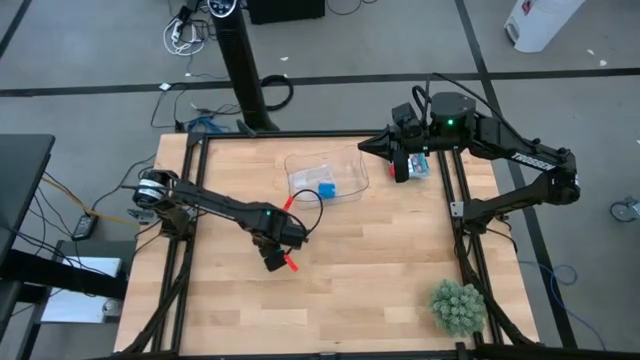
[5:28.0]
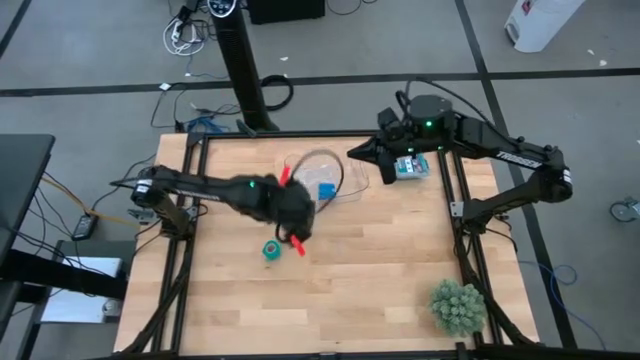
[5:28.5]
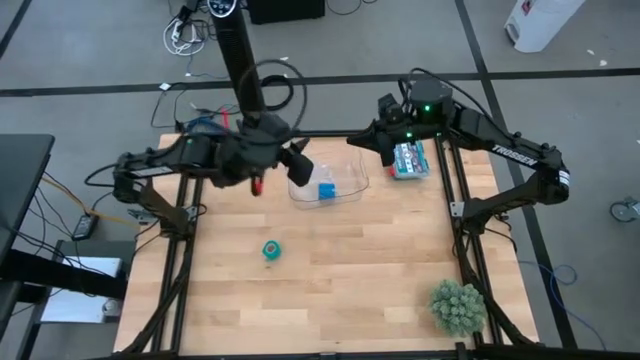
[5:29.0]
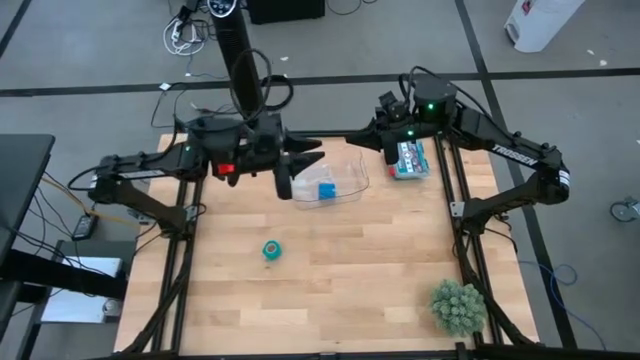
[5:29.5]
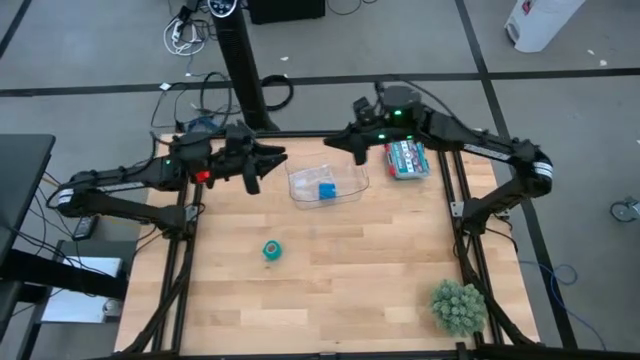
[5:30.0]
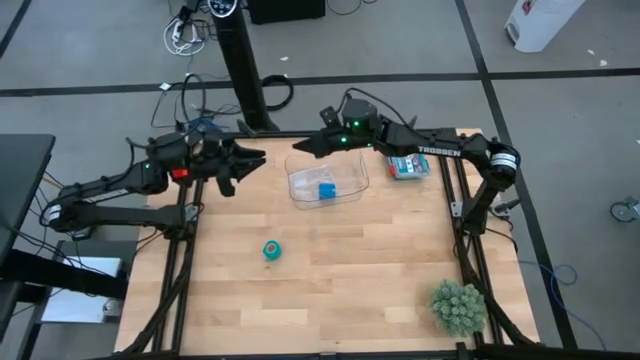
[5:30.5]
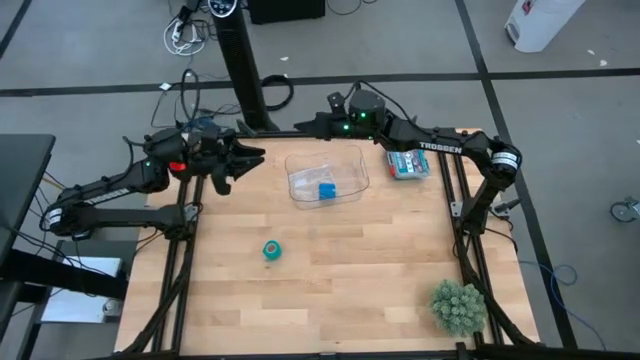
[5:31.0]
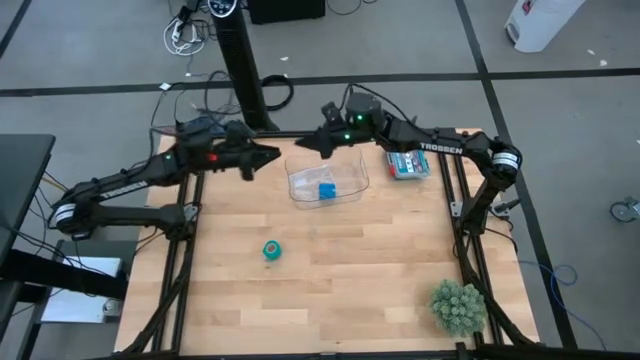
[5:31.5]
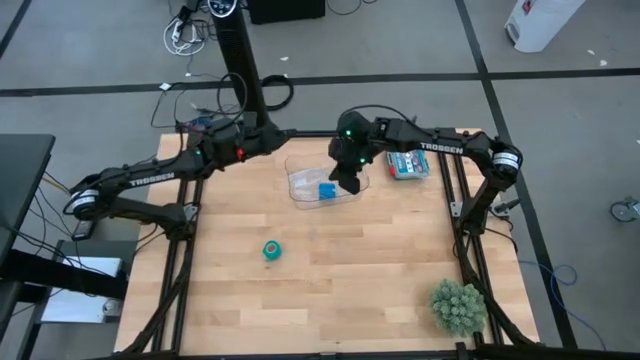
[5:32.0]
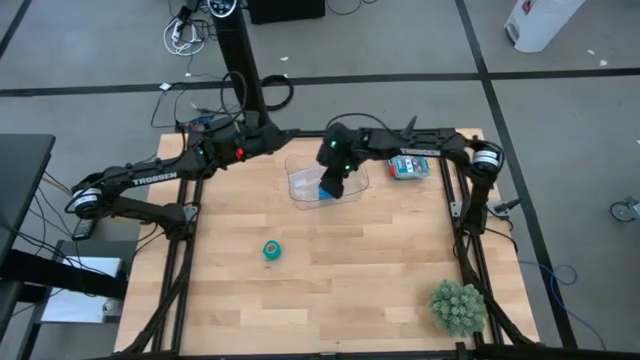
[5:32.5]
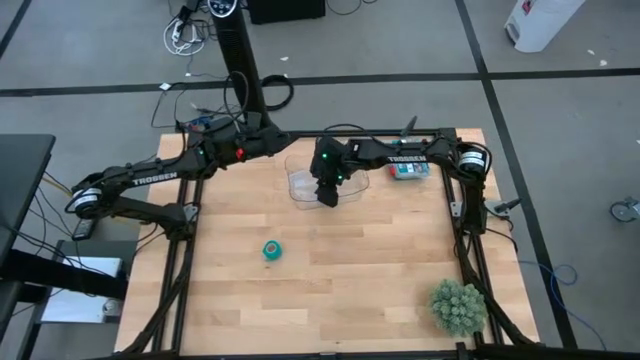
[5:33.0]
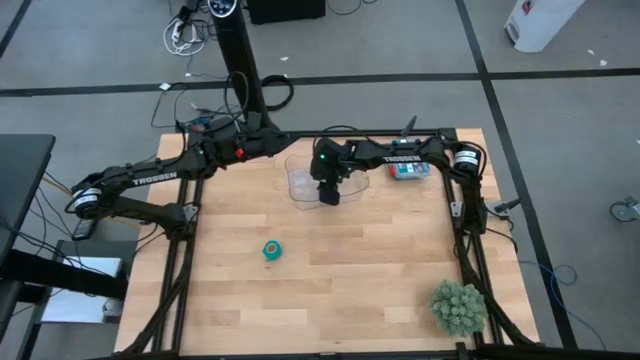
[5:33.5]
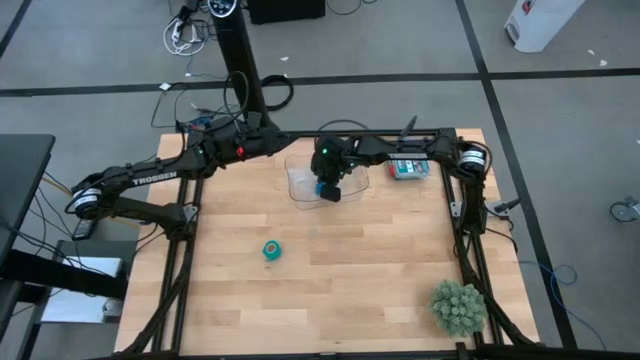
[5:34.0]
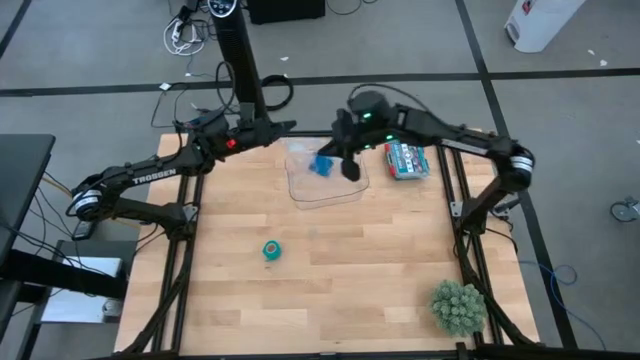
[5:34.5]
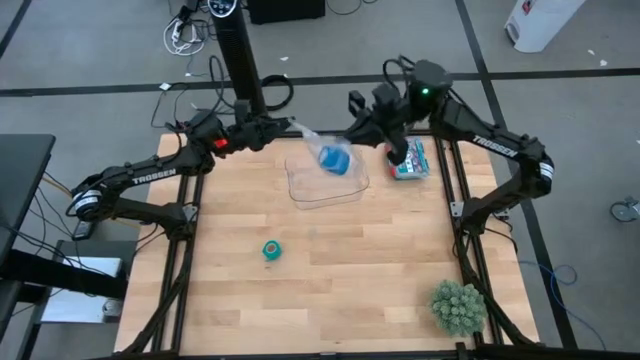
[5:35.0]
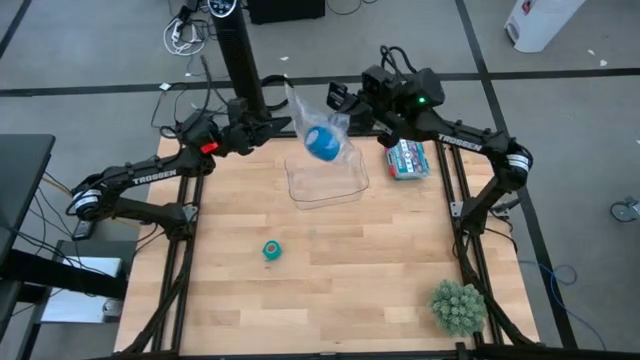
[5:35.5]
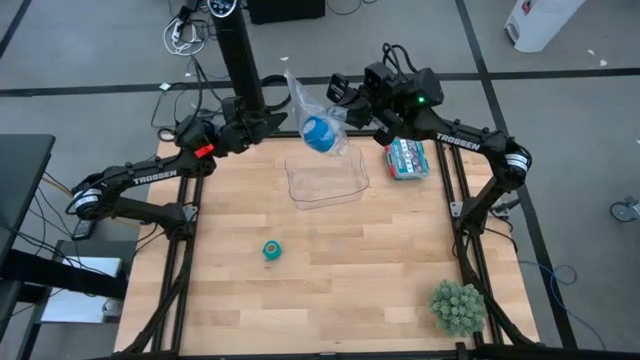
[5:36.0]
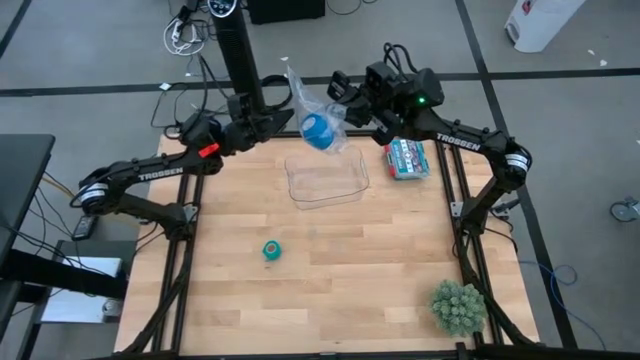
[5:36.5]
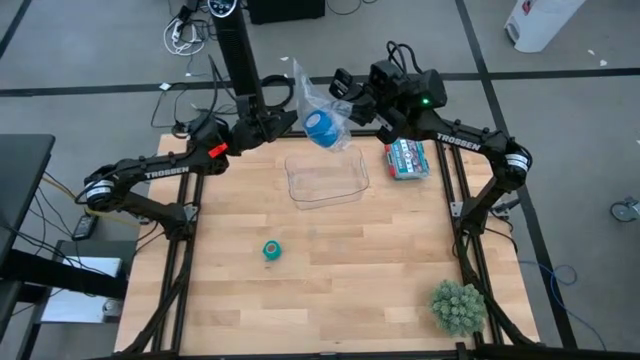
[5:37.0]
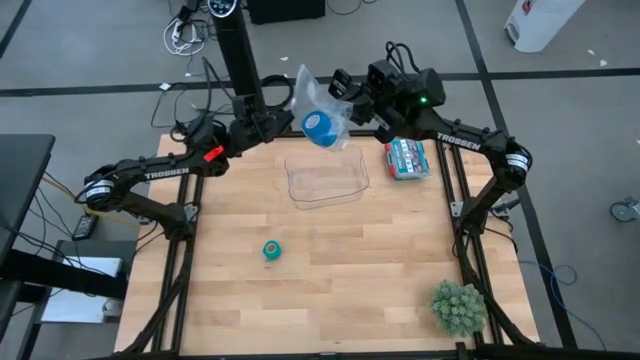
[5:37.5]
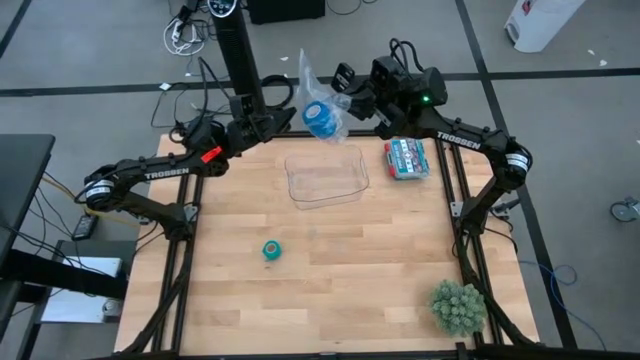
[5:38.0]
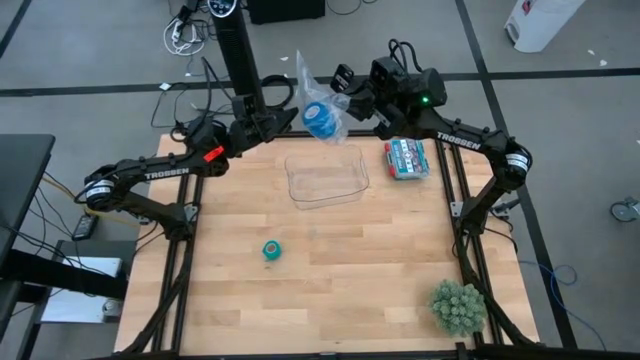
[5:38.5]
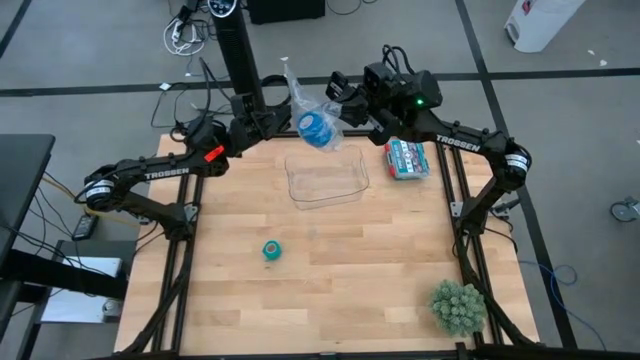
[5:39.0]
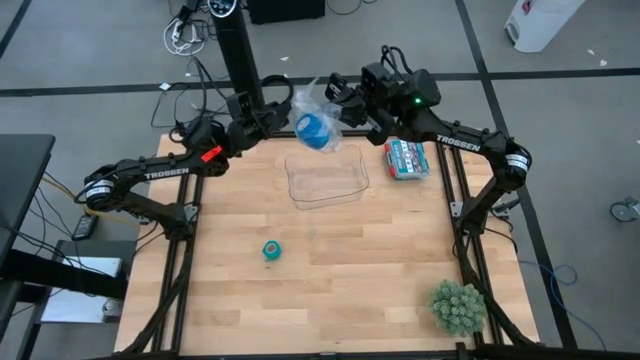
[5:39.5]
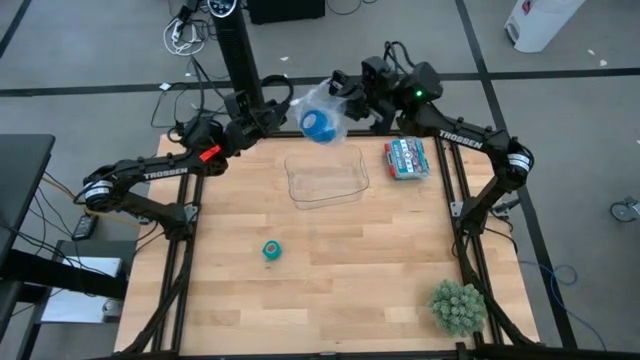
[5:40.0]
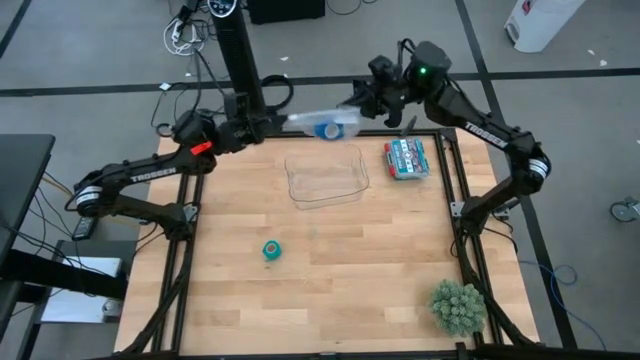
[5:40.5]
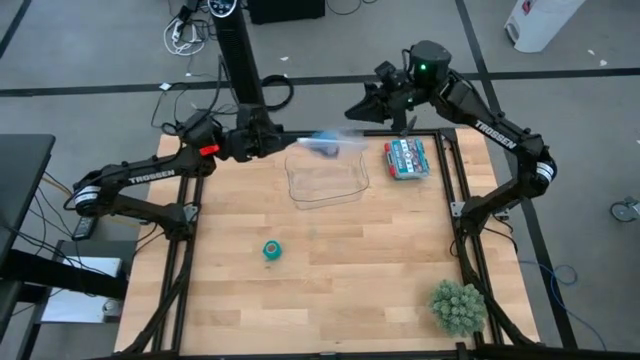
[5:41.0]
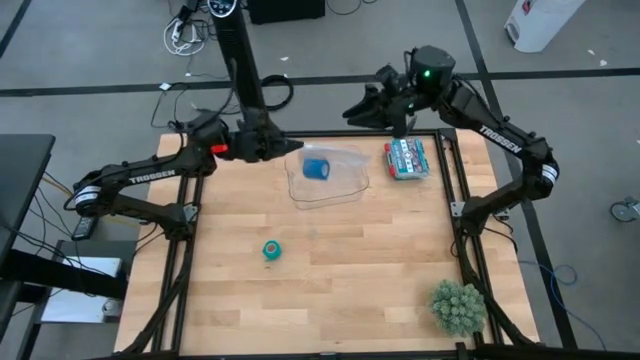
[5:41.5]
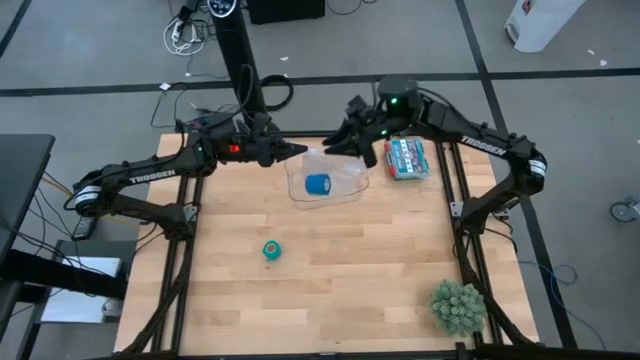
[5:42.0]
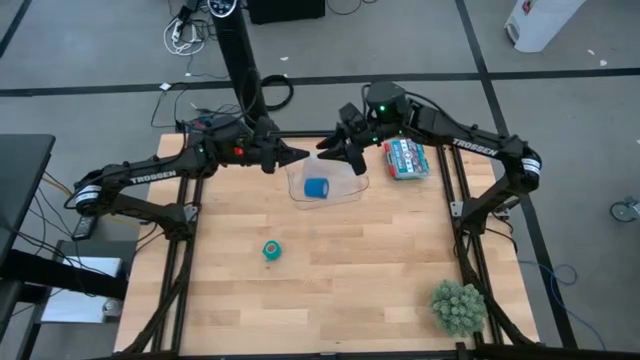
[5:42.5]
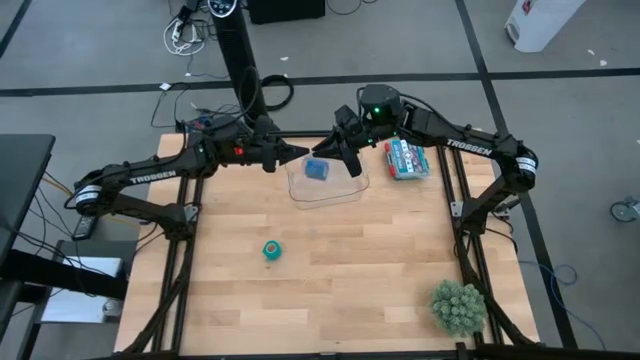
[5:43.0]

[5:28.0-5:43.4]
Task: Roll bandage
Open the transparent zip bag

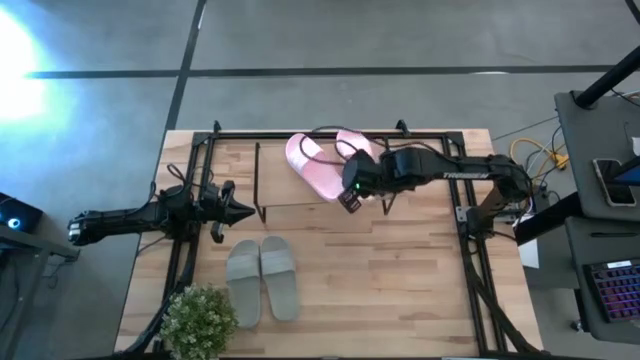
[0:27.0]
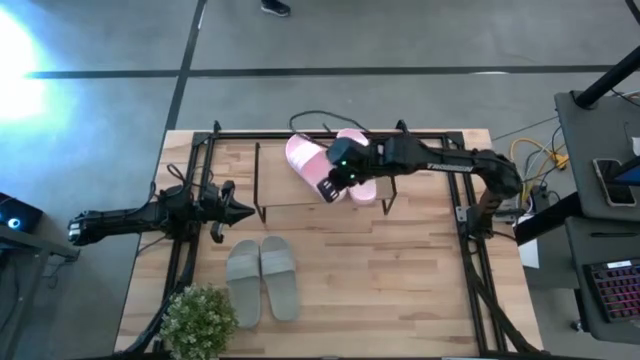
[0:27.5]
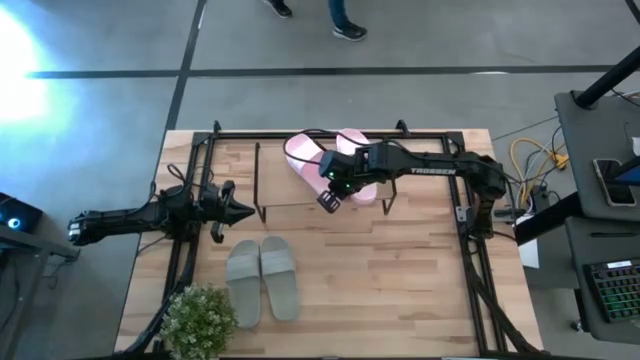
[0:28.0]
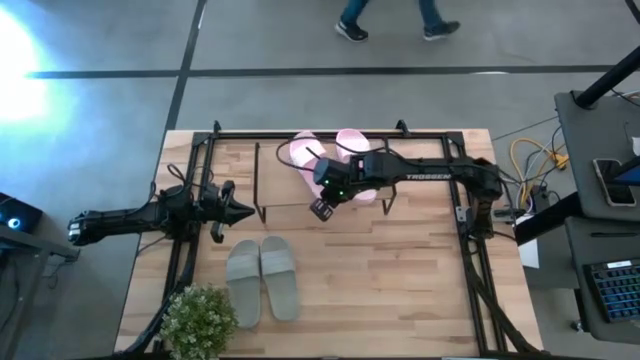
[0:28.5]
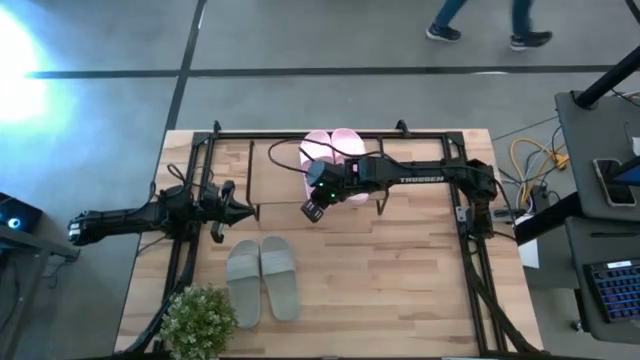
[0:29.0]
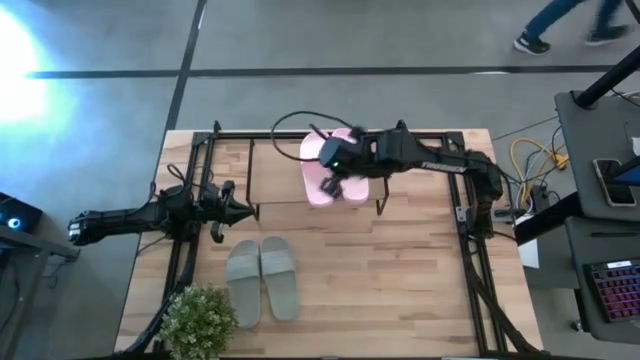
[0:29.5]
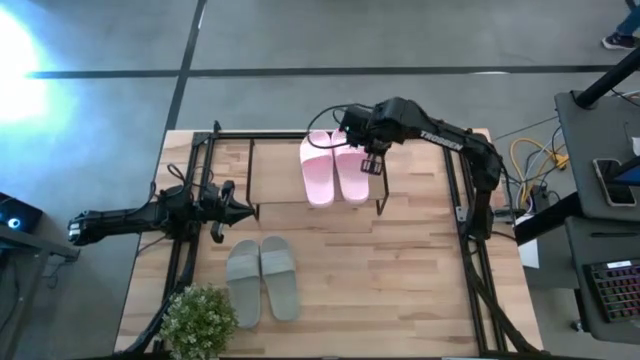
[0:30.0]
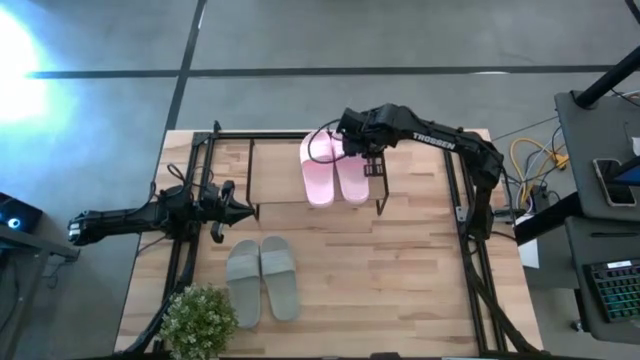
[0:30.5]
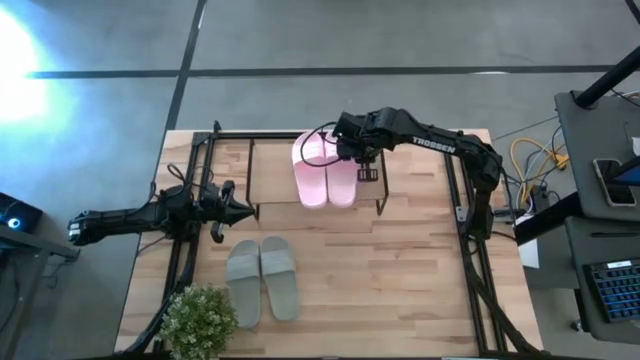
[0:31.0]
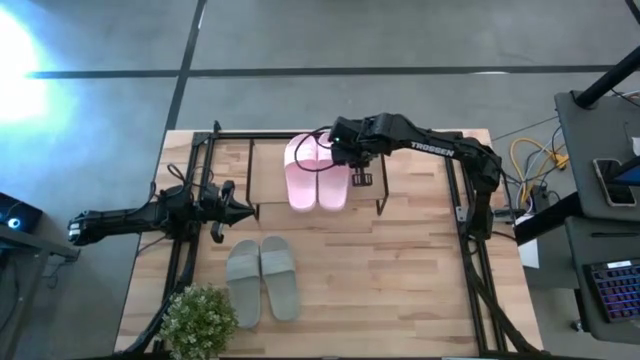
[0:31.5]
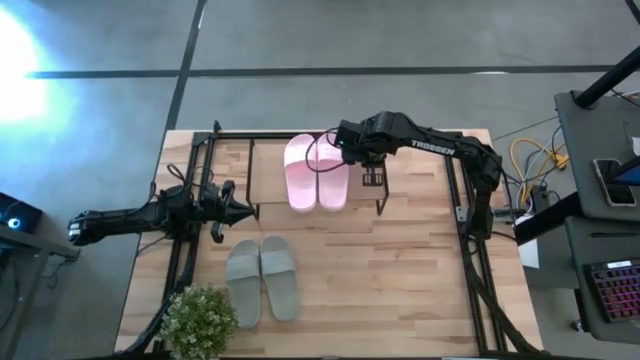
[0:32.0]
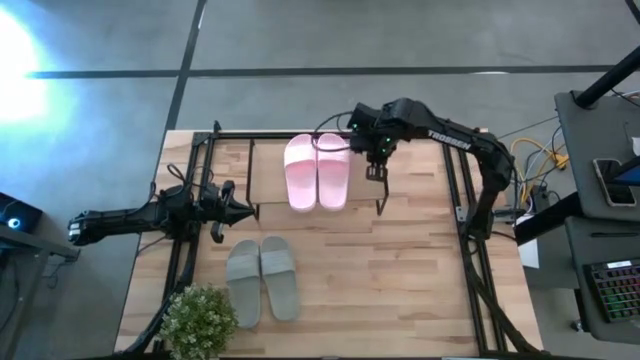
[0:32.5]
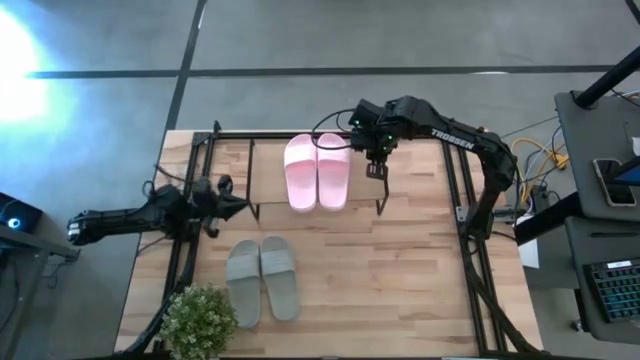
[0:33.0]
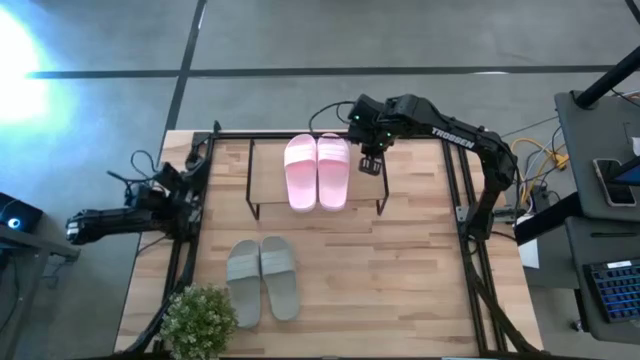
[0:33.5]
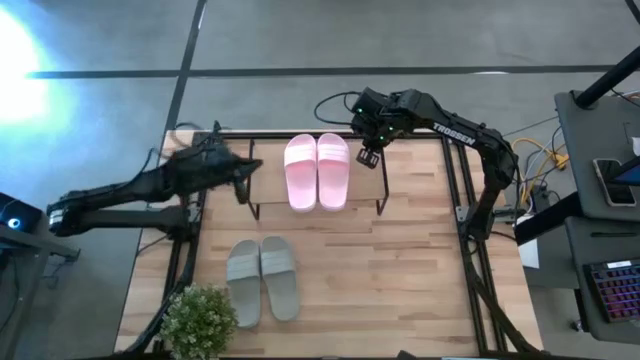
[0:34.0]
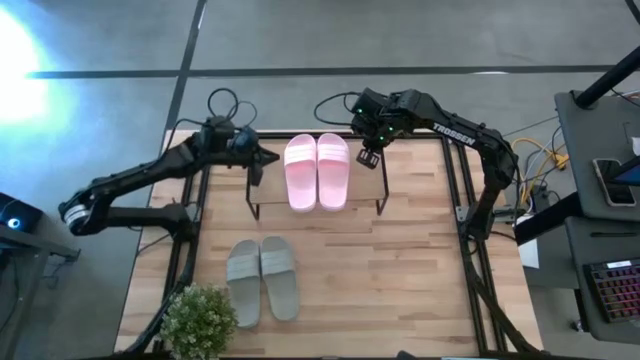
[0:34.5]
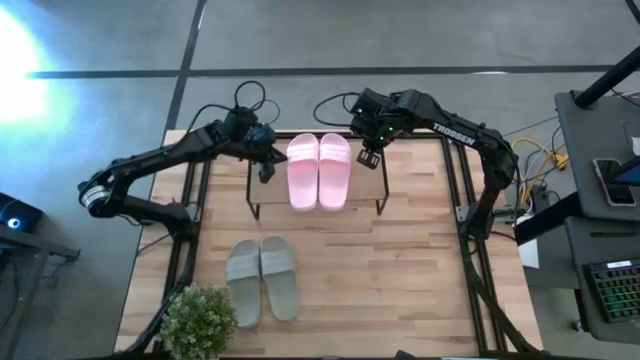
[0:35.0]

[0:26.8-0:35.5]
Task: Pick and place slides into the shelf
Adjust the pink slides on the shelf
